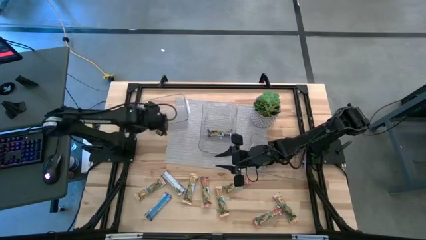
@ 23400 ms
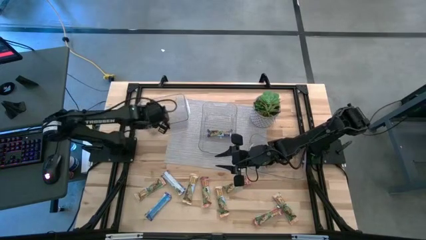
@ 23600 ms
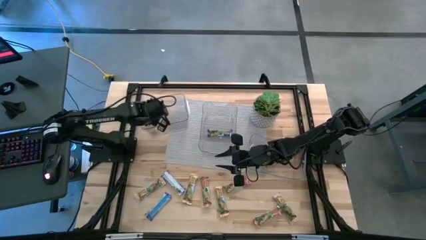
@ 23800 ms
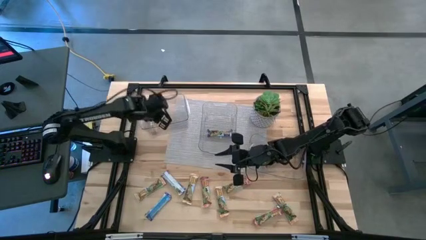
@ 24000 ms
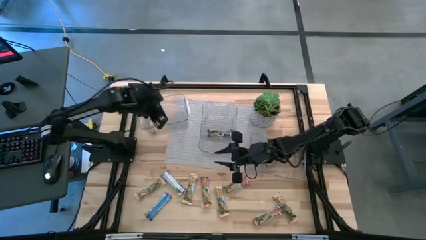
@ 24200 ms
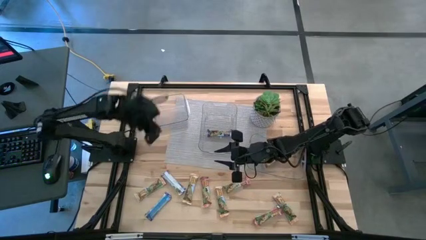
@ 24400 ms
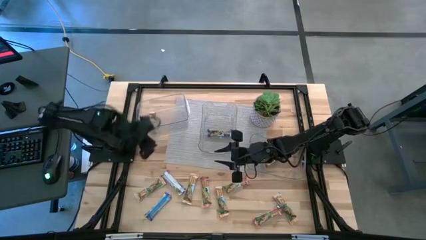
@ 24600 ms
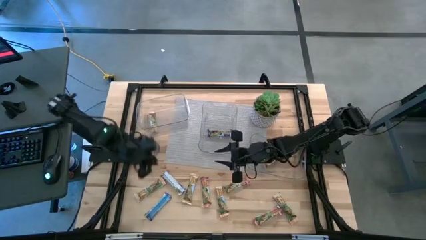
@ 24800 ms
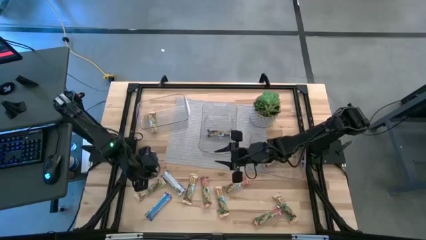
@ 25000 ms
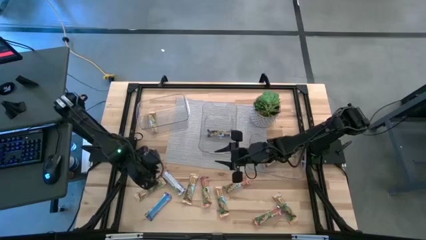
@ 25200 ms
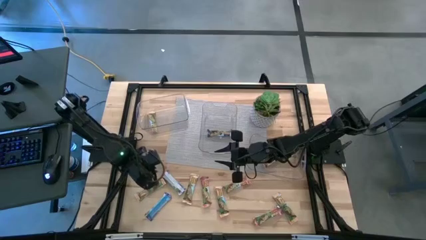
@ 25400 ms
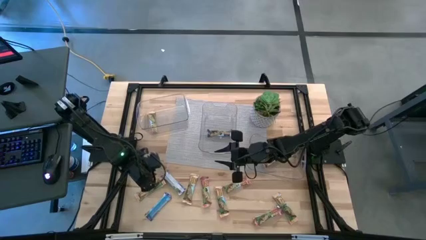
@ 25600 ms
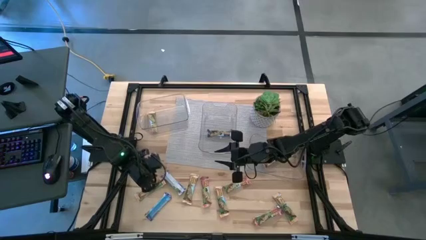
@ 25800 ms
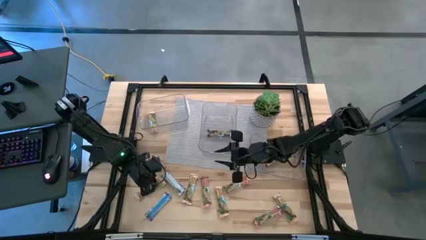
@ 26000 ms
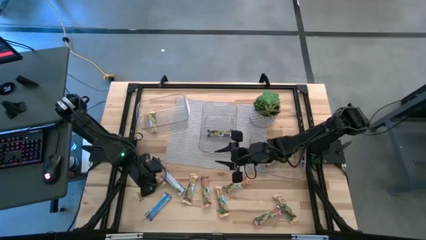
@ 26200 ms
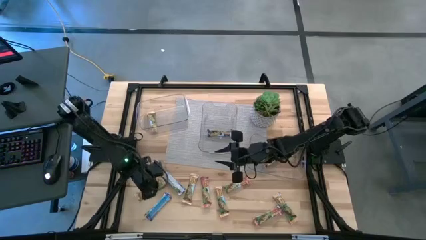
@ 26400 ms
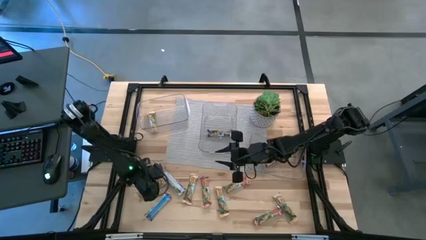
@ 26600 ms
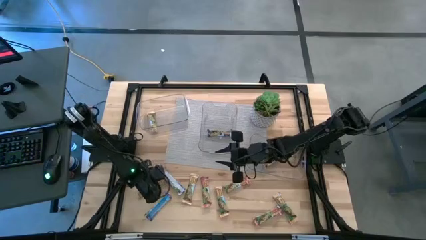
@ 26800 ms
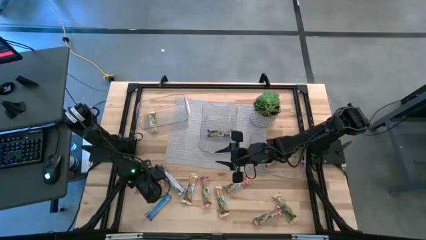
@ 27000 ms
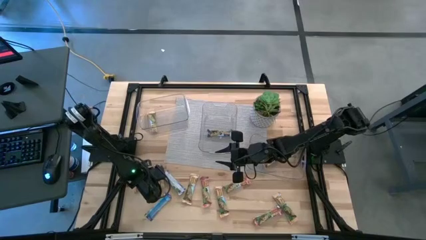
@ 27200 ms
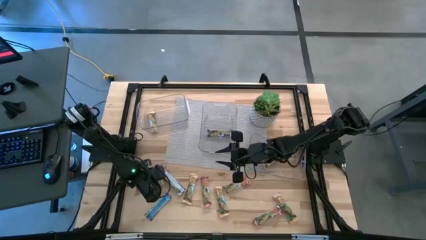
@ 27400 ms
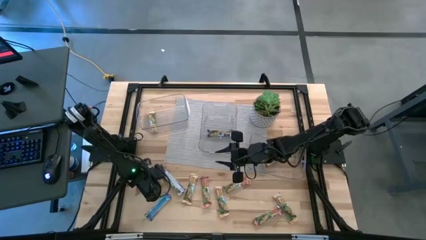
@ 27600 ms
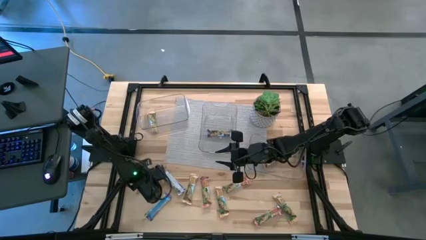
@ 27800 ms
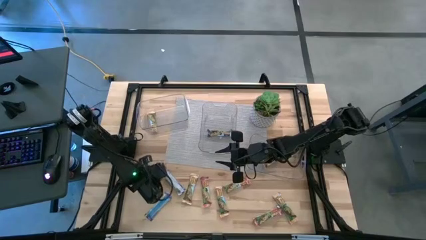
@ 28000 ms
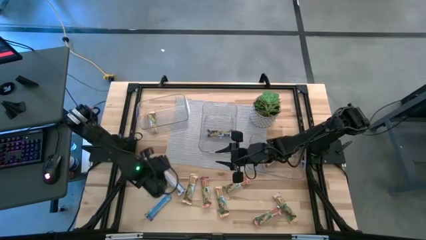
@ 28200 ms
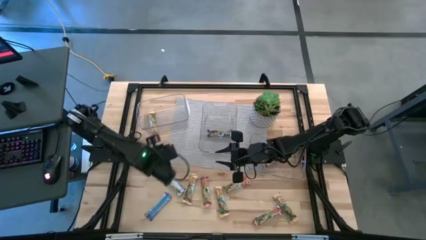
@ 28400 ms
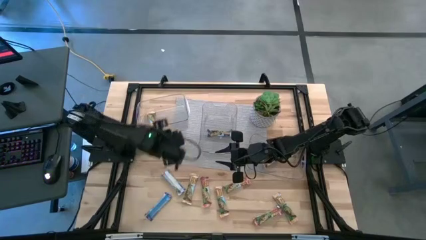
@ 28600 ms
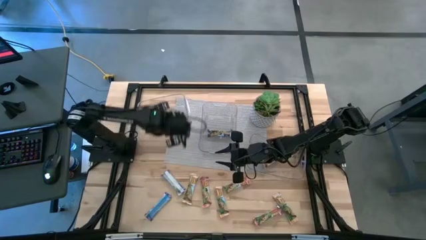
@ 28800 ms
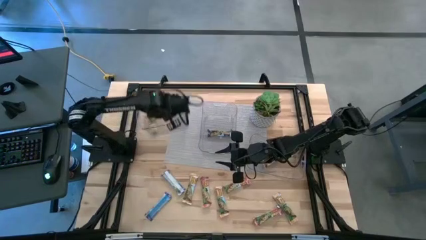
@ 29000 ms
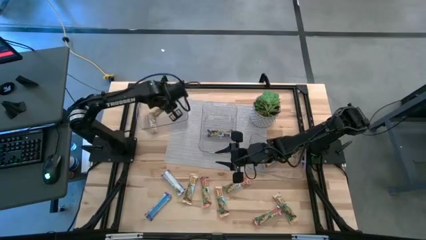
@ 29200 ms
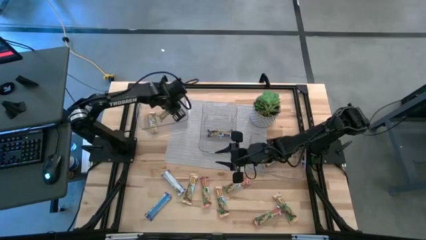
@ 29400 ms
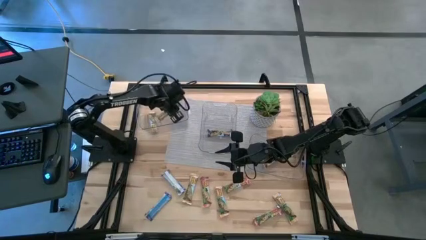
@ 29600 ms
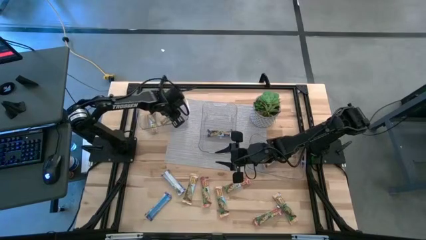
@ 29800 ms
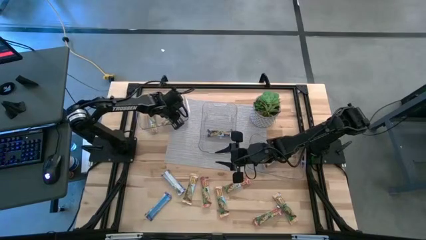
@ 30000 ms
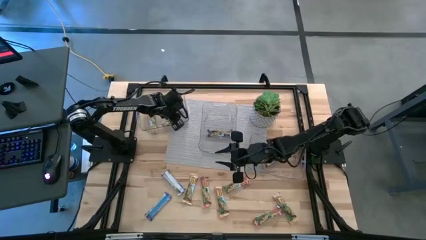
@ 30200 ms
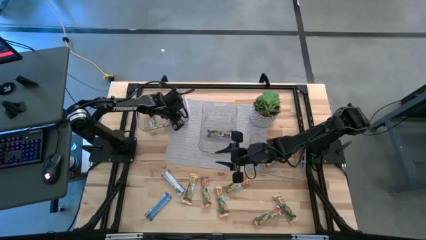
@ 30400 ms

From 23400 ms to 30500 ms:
Task: Pick and place Granola Bars by type
Put the yellow granola bar into the left transparent bin

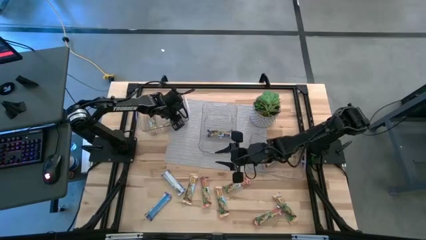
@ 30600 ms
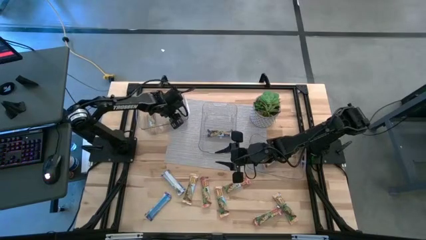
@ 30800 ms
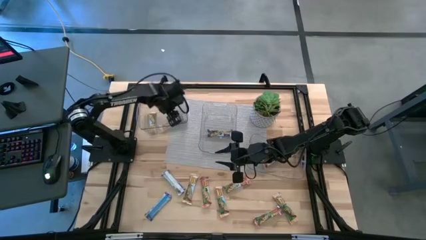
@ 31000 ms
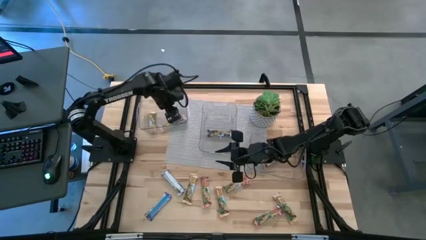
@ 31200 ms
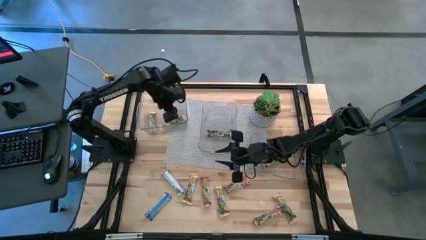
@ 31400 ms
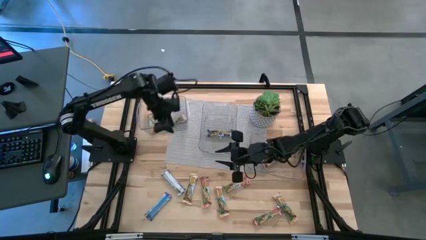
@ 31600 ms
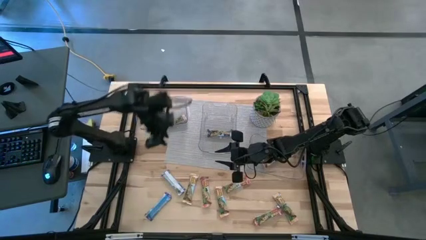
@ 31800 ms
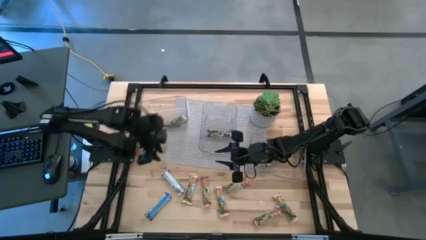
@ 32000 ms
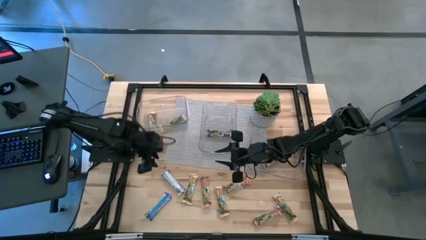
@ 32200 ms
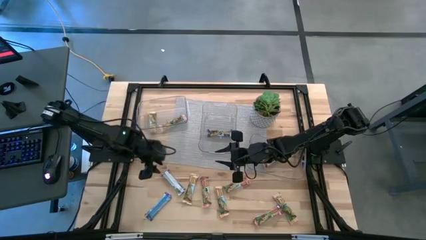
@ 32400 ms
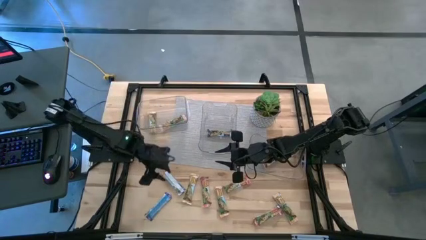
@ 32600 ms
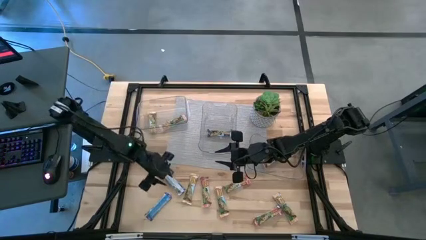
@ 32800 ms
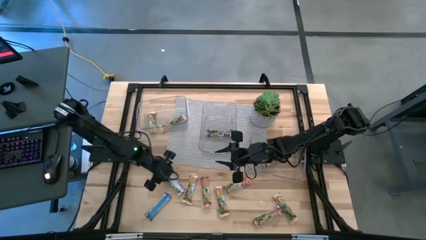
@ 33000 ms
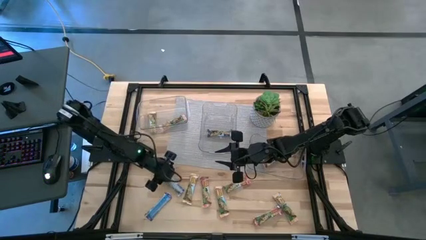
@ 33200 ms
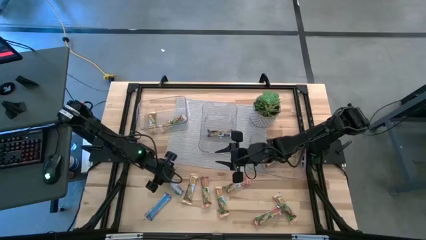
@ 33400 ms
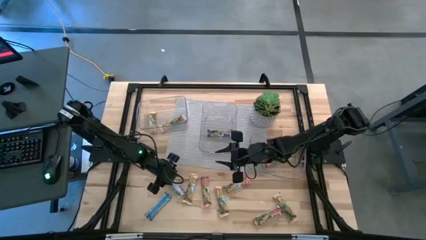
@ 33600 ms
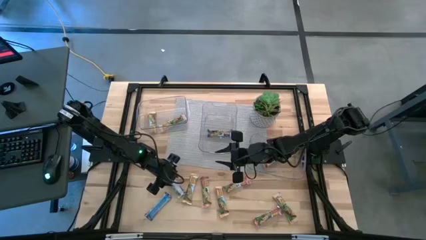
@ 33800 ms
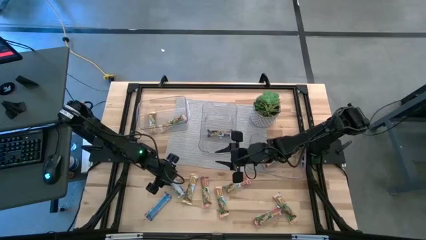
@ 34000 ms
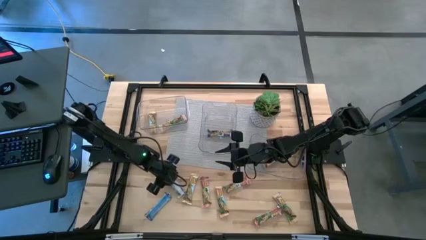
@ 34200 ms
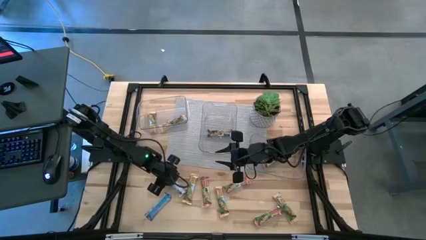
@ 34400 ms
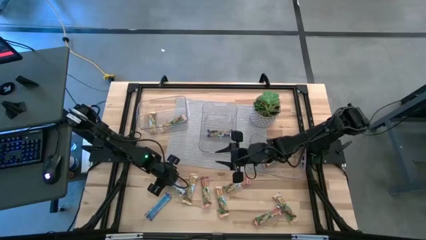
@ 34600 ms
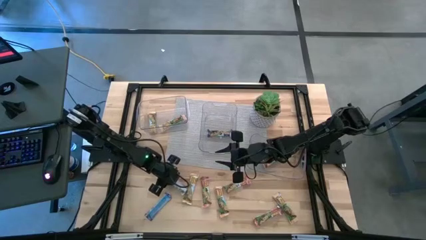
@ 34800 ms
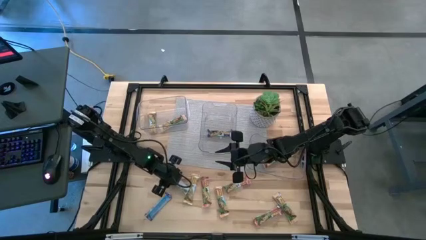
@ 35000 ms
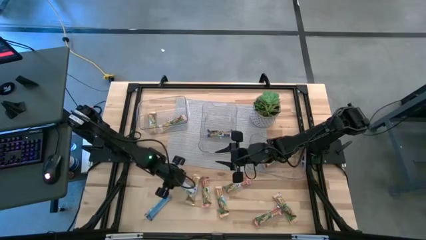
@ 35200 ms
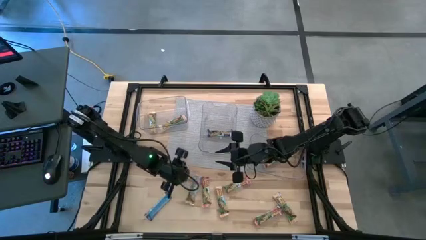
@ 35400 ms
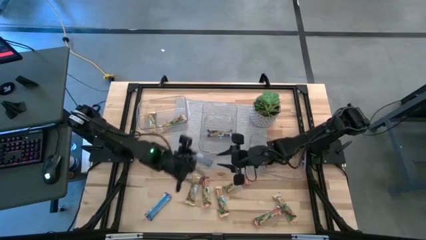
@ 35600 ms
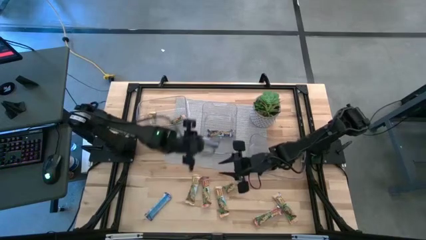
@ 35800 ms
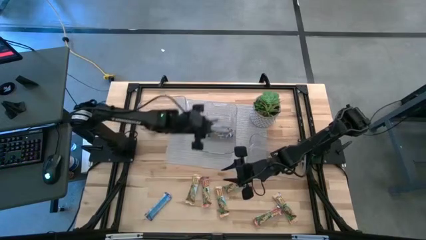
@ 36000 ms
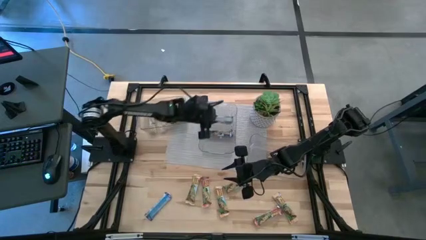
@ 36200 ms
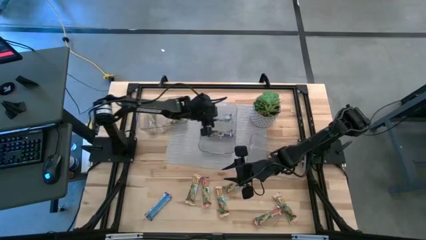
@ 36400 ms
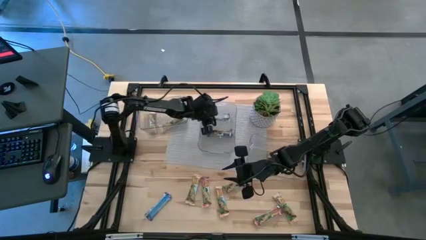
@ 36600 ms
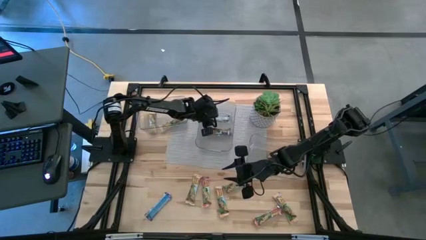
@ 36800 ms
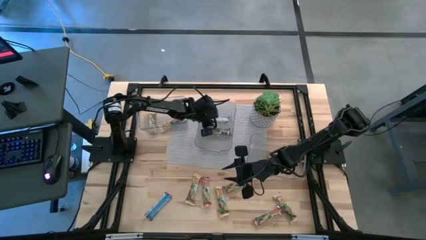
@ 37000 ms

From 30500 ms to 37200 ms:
Put the blue granola bar into the middle transparent bin
